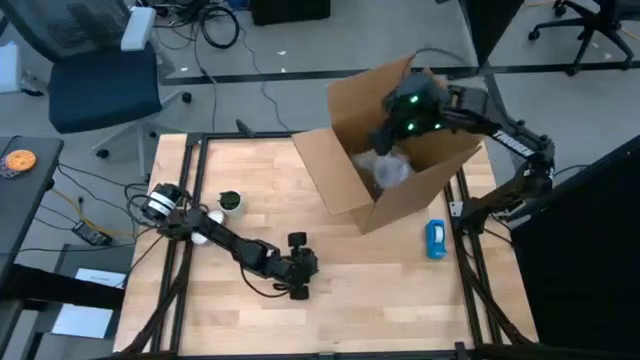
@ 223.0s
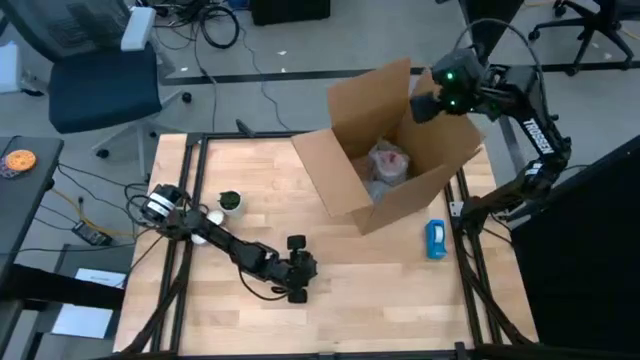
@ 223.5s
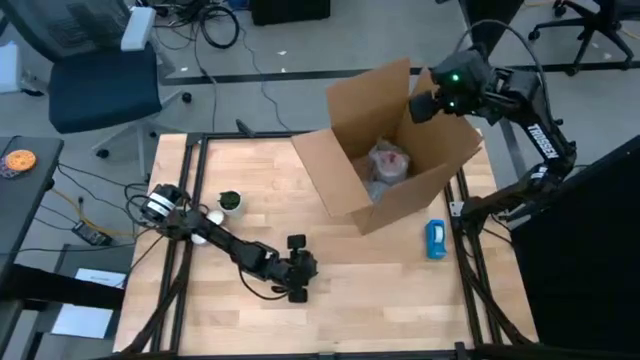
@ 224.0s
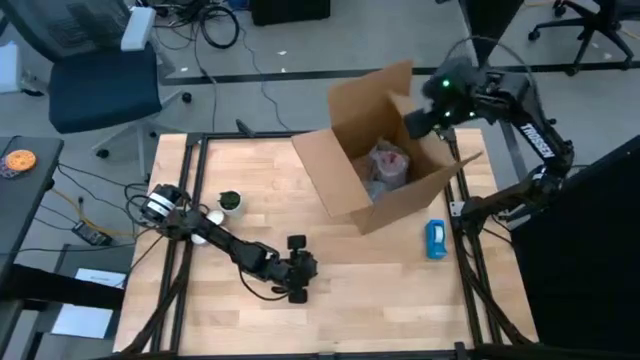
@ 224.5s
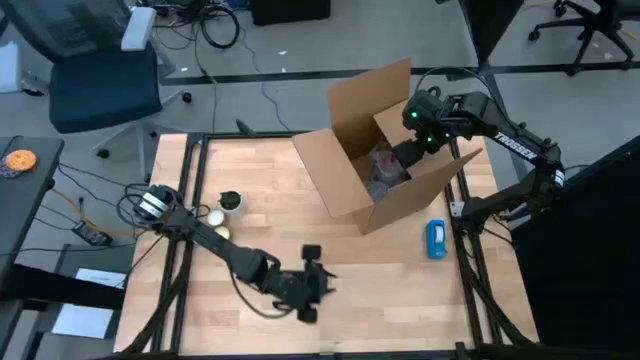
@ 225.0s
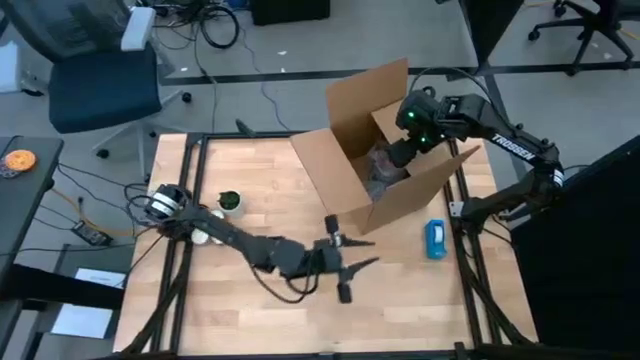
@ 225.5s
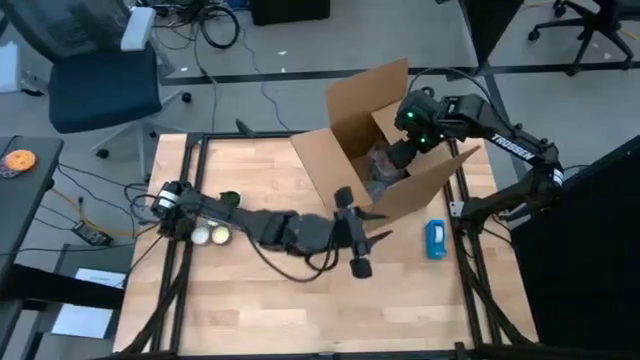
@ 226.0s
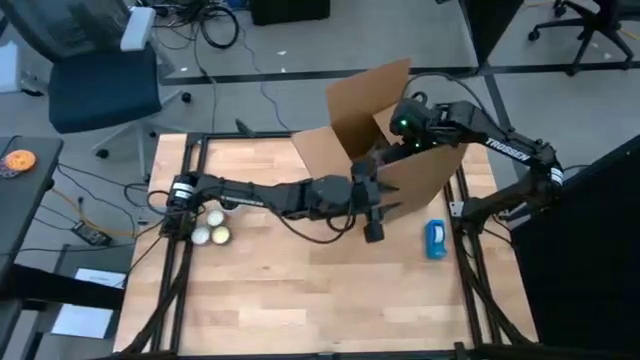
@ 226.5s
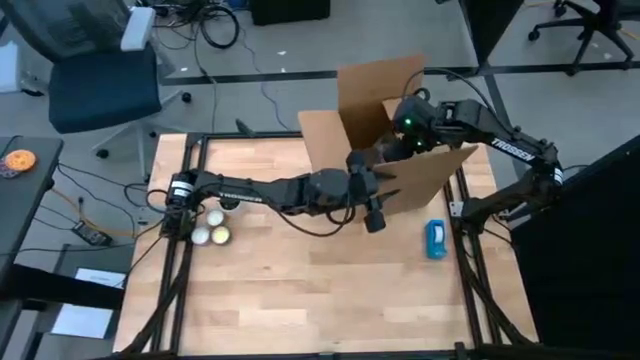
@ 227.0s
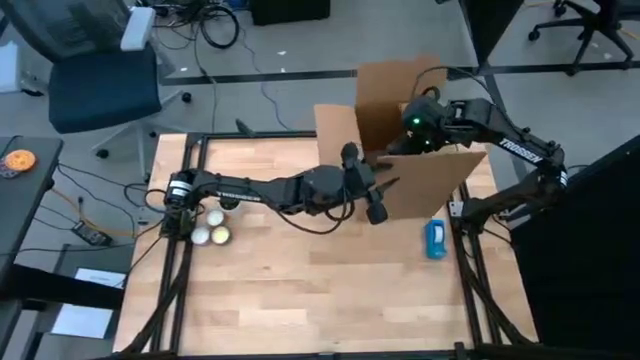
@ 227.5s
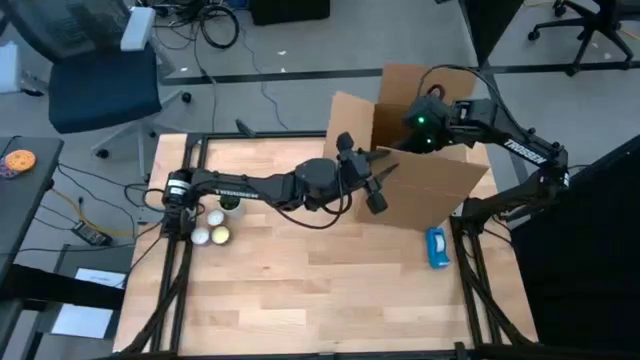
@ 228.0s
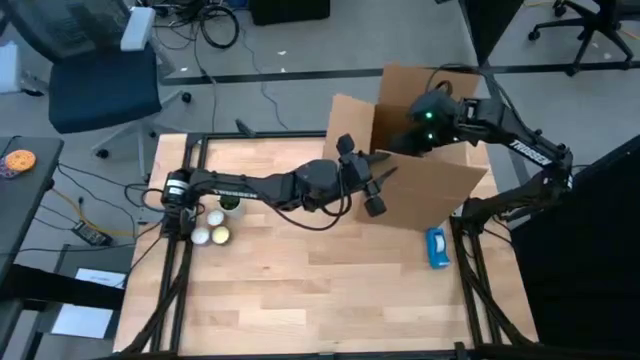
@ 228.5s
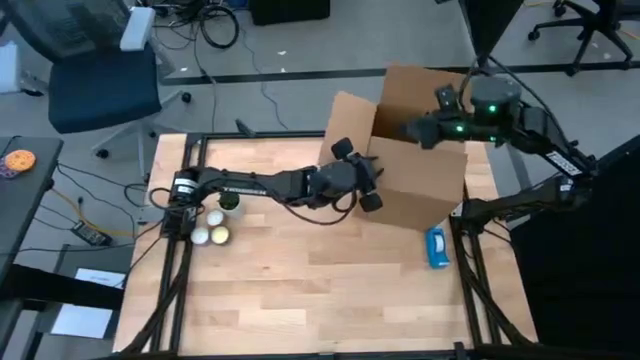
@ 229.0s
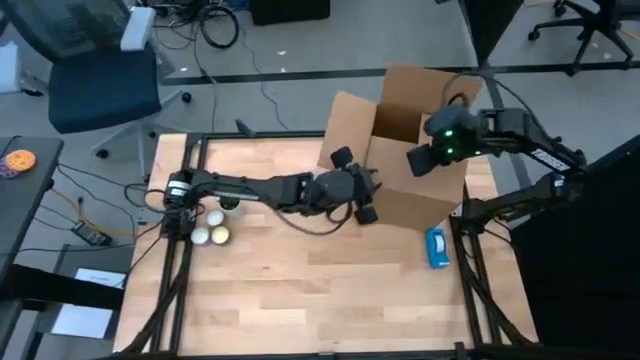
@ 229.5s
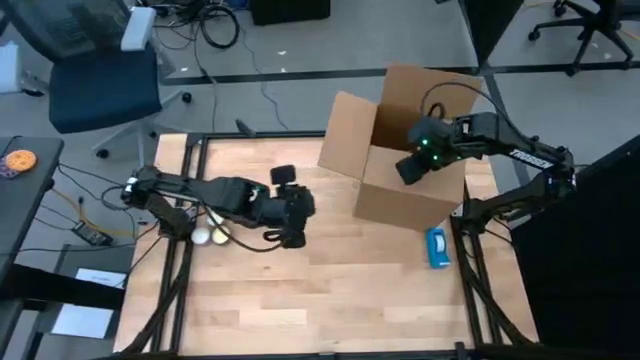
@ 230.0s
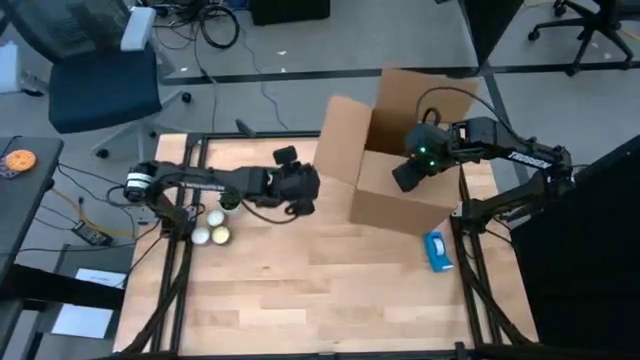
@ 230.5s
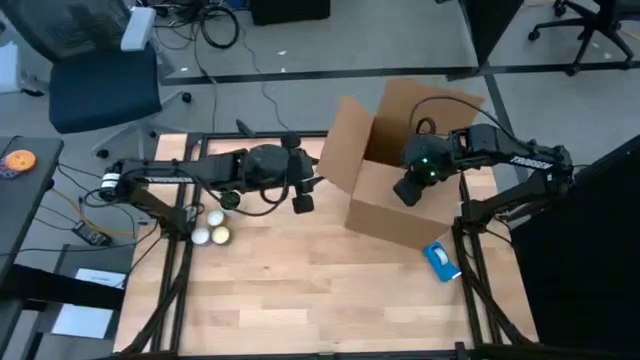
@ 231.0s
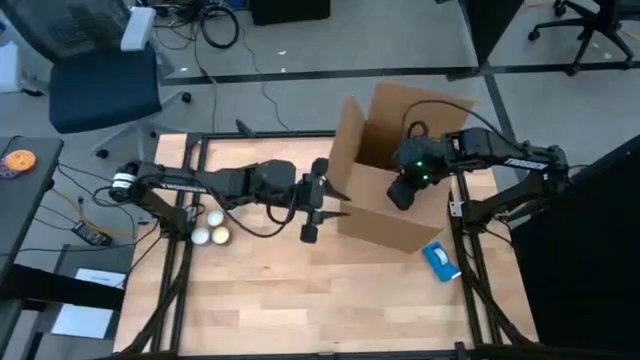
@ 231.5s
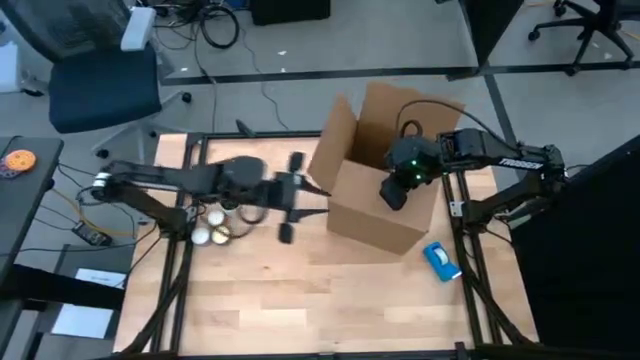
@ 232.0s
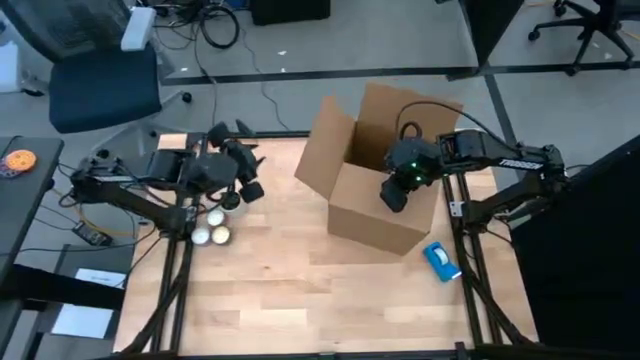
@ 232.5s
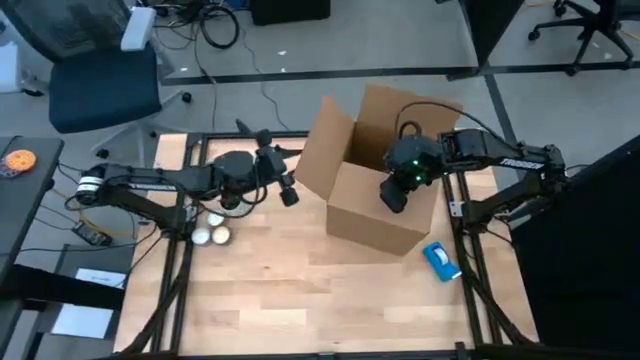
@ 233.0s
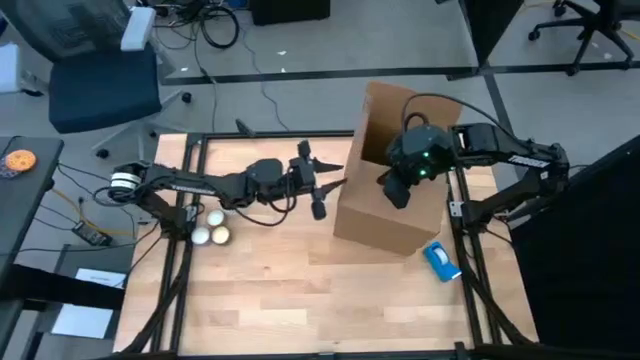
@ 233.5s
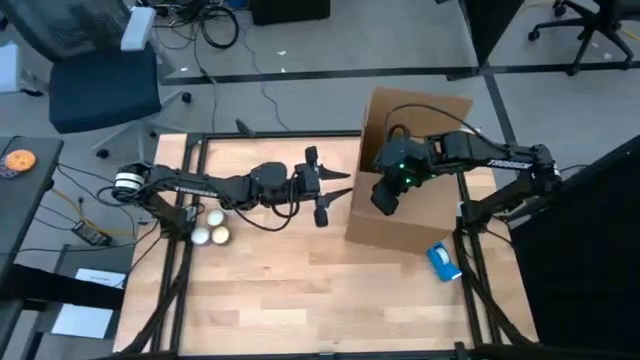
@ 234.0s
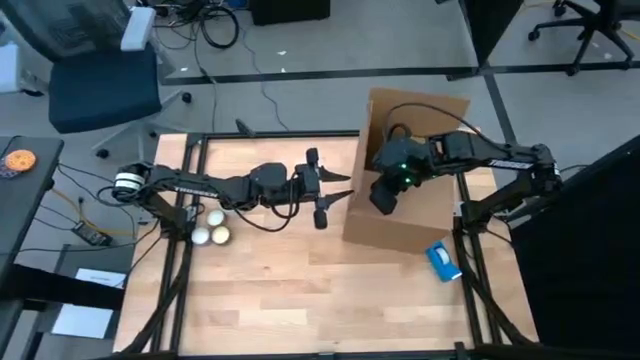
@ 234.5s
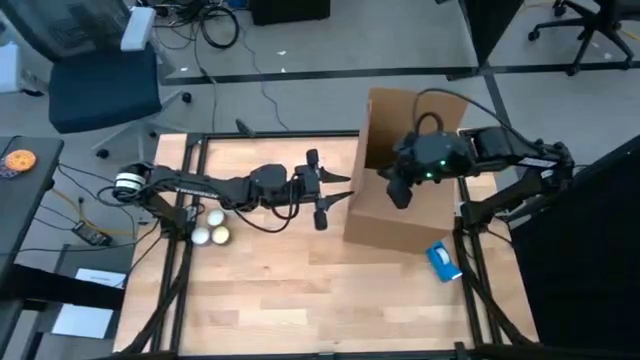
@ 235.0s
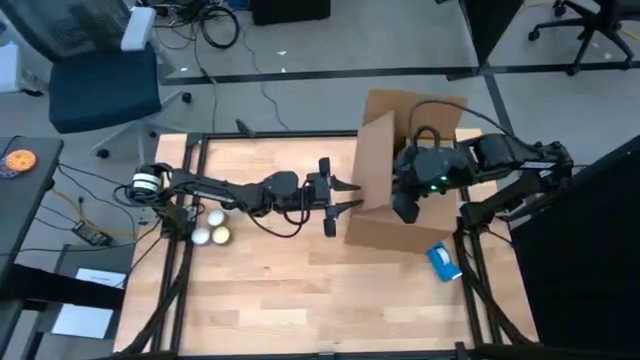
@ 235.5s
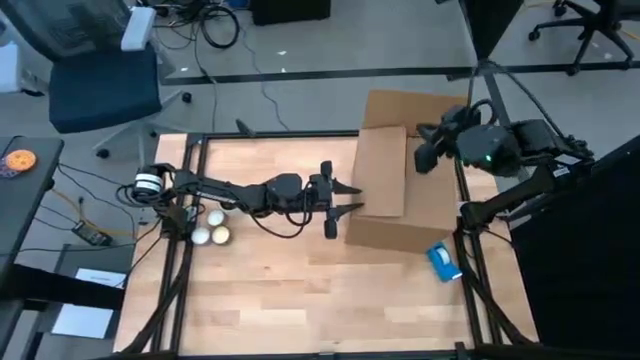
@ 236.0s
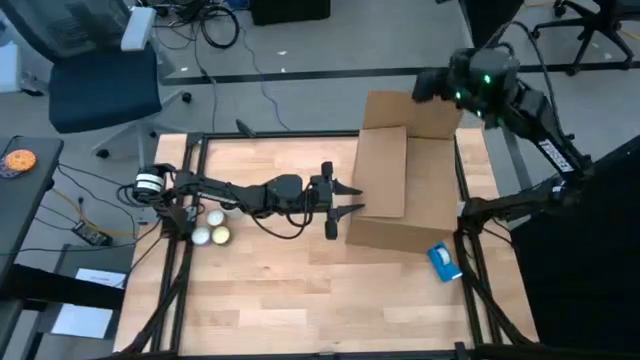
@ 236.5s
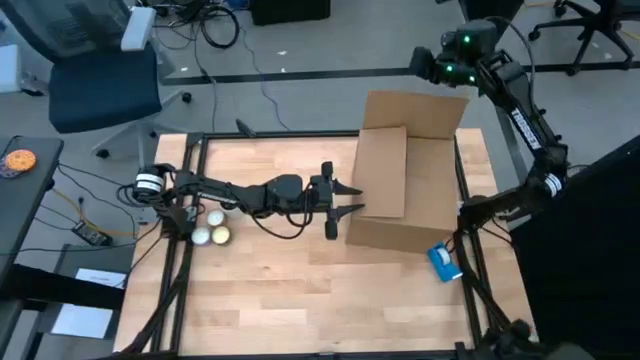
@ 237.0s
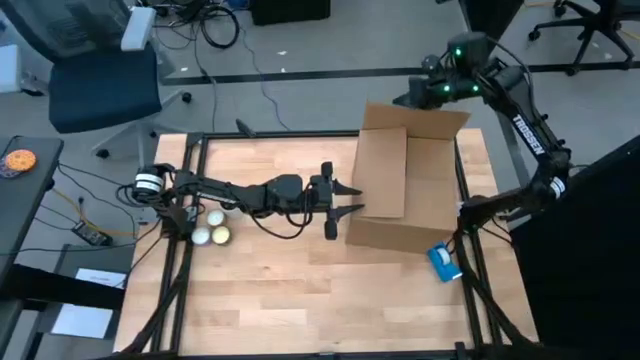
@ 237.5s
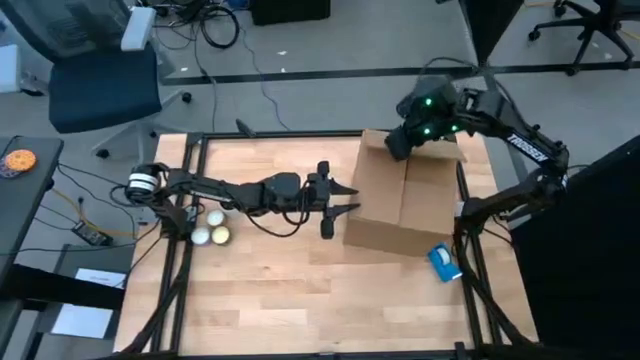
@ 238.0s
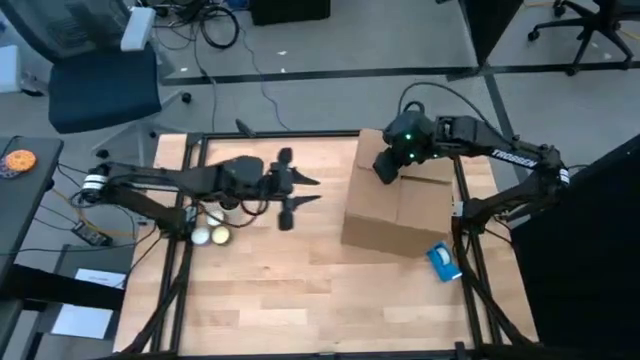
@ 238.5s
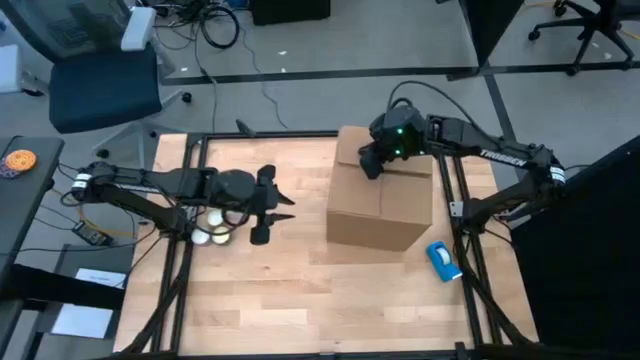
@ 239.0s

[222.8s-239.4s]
Task: wrap mug
Close the cardboard box

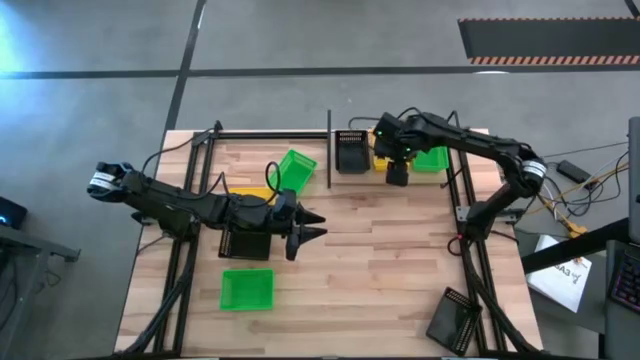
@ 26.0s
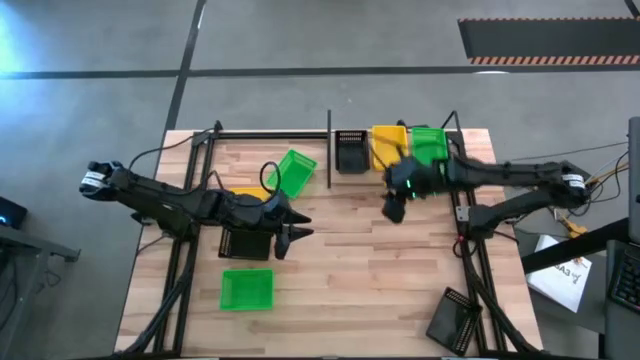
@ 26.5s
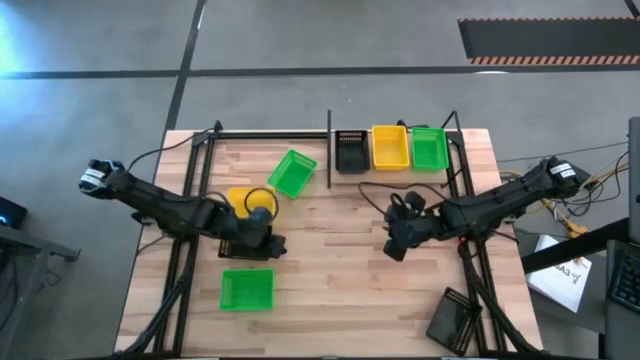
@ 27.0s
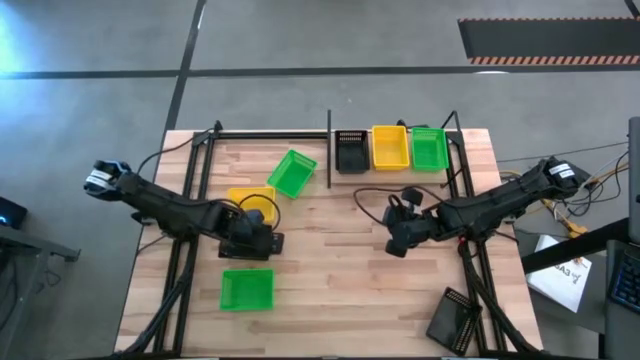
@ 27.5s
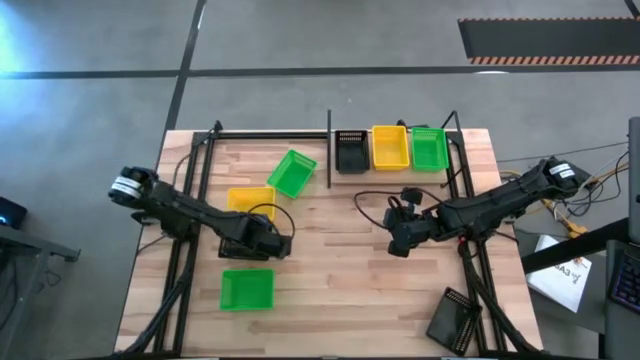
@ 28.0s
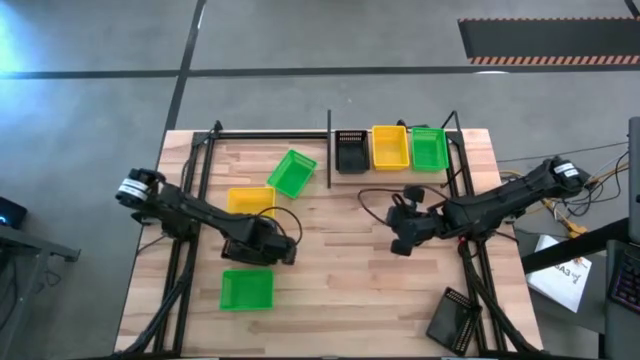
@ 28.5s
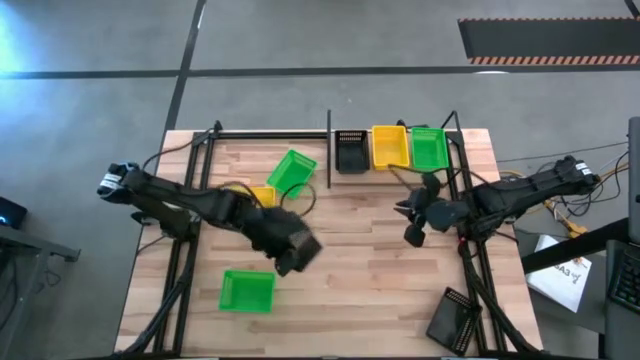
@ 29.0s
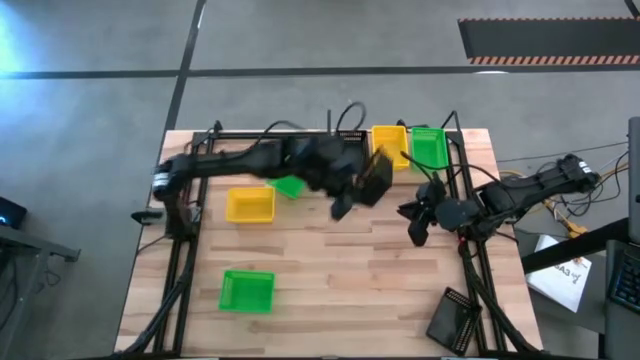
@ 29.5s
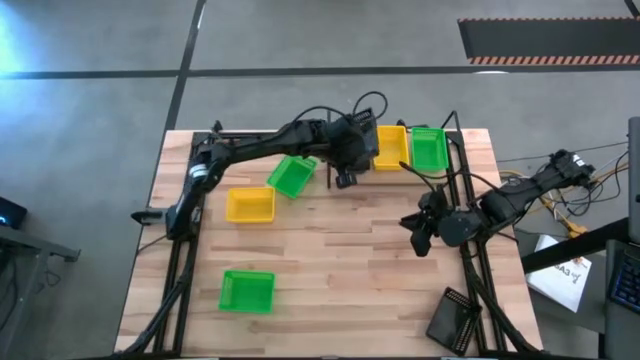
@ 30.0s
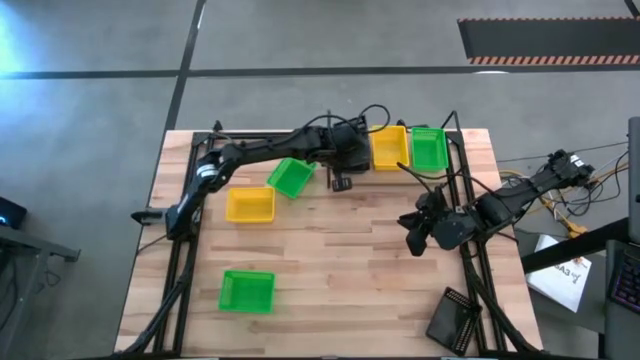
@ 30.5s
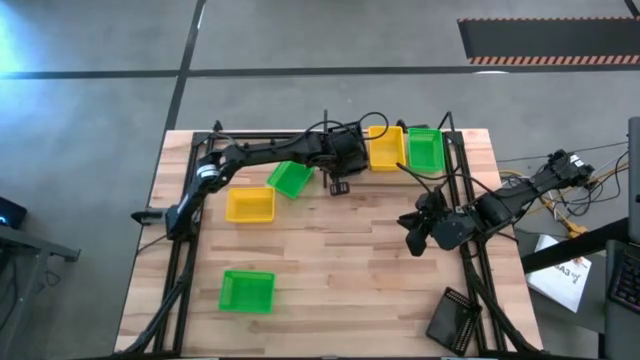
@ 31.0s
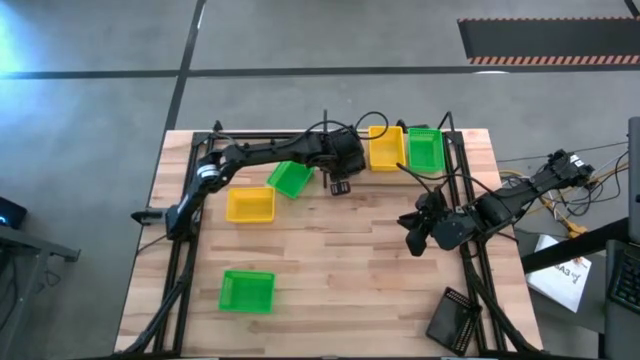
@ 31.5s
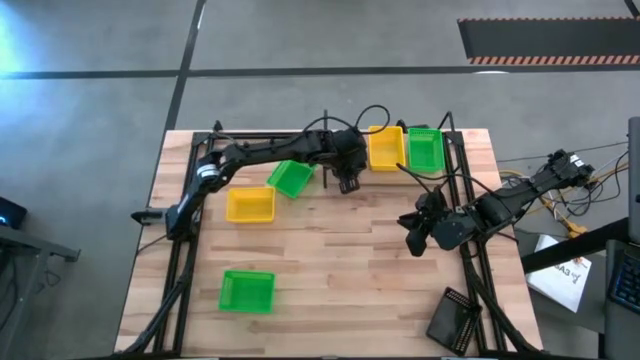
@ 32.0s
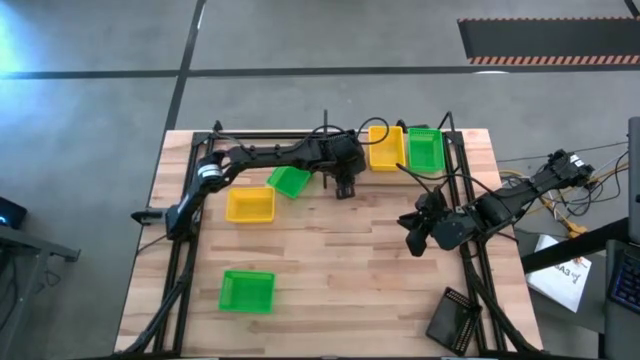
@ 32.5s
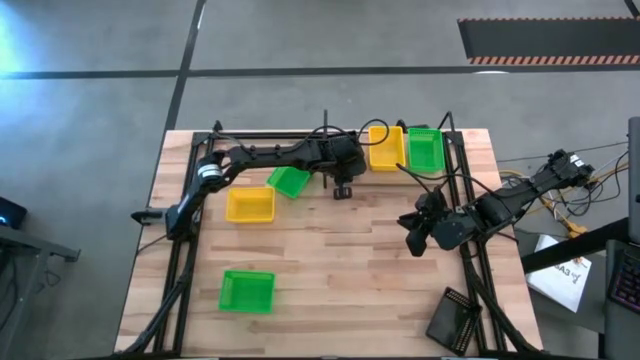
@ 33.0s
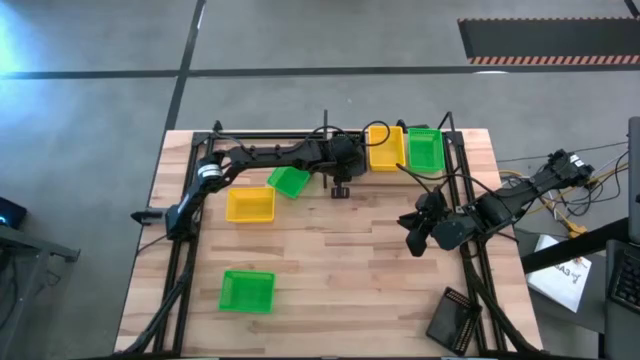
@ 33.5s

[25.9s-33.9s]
Task: Stack baskets on shelf by color
Stack the left black bin on top of the black bin on the shelf
